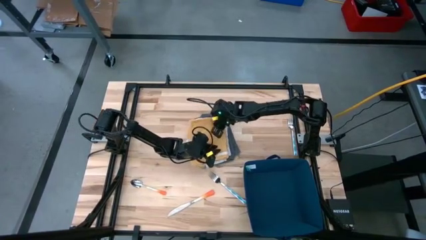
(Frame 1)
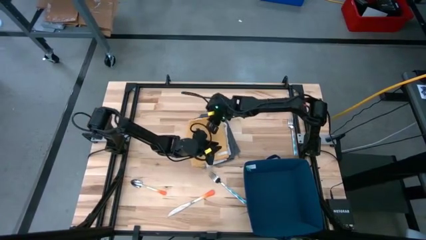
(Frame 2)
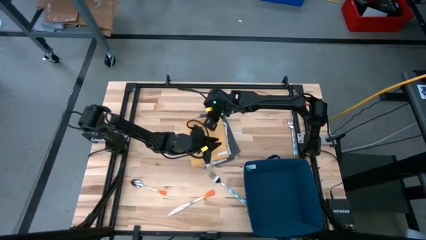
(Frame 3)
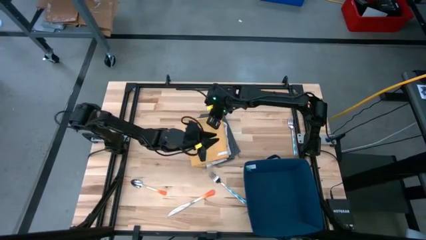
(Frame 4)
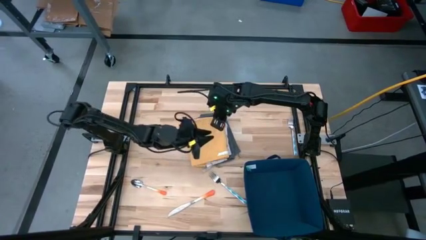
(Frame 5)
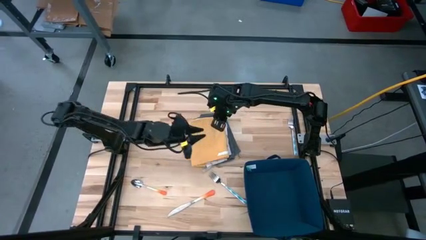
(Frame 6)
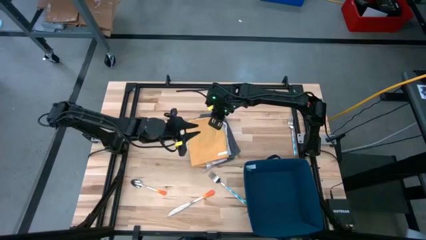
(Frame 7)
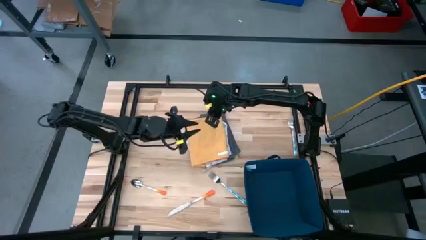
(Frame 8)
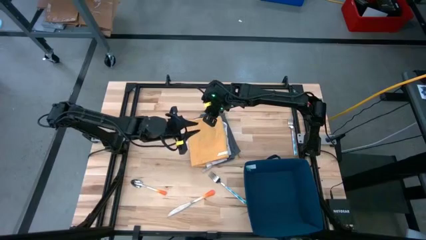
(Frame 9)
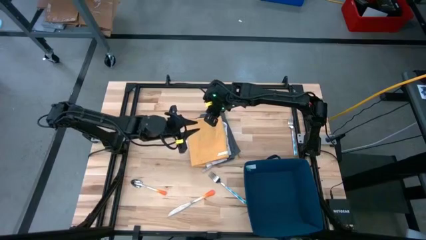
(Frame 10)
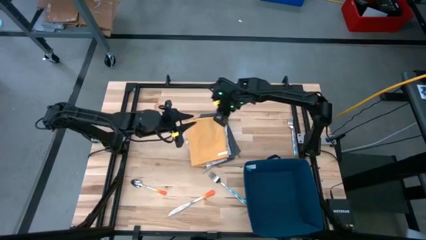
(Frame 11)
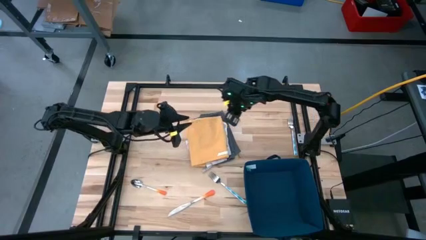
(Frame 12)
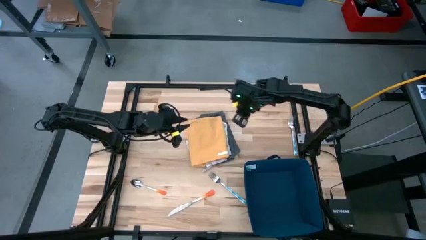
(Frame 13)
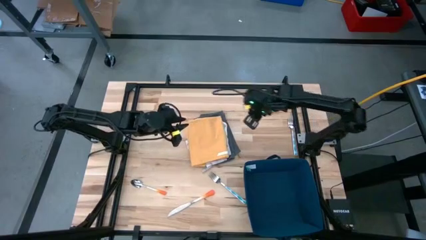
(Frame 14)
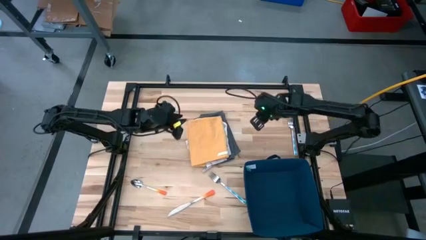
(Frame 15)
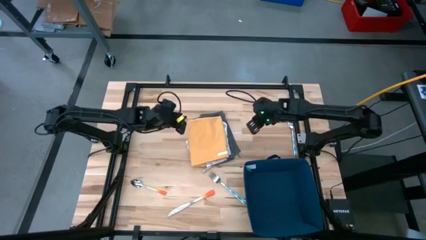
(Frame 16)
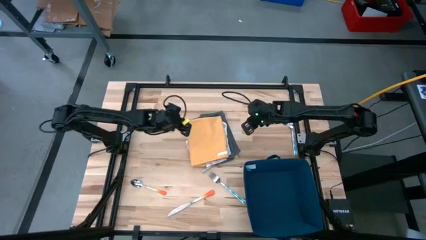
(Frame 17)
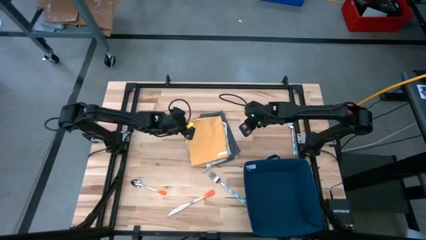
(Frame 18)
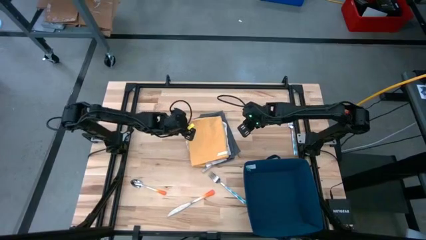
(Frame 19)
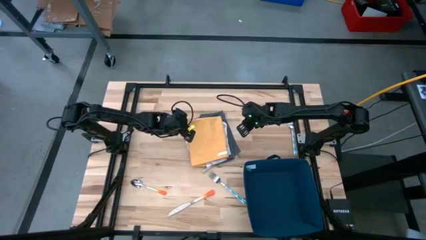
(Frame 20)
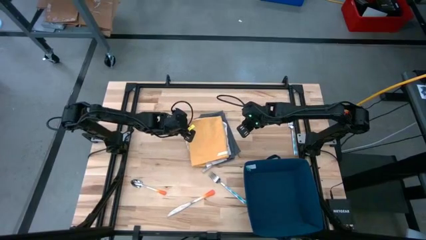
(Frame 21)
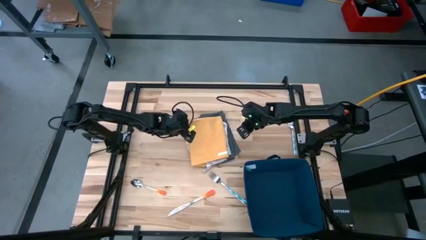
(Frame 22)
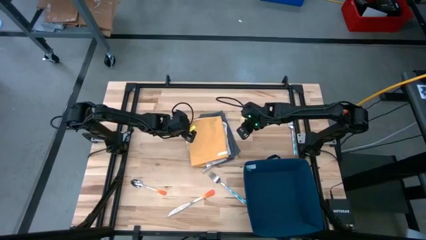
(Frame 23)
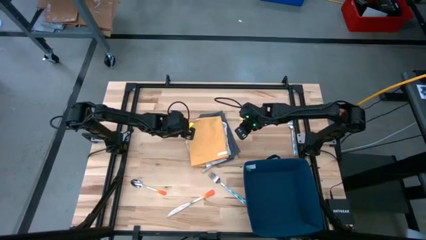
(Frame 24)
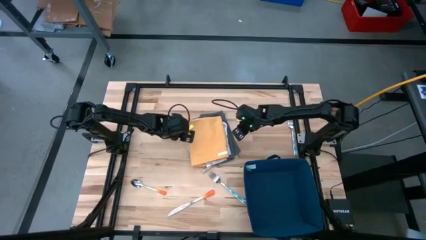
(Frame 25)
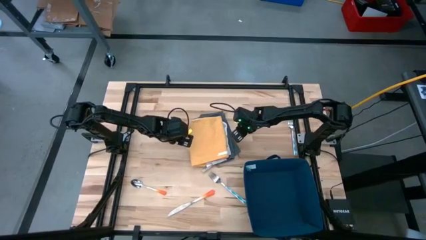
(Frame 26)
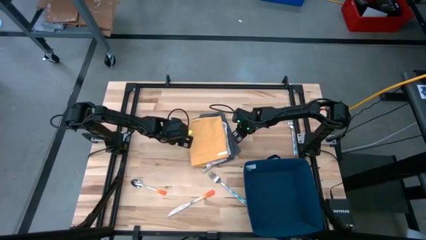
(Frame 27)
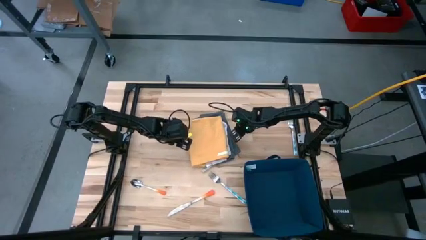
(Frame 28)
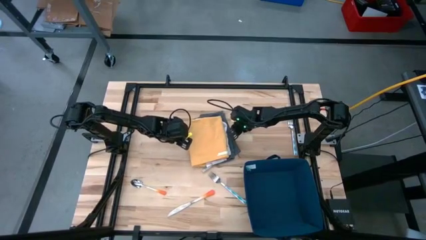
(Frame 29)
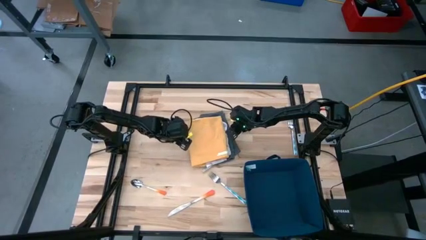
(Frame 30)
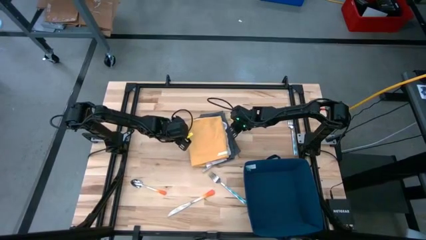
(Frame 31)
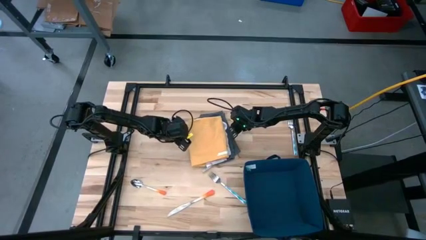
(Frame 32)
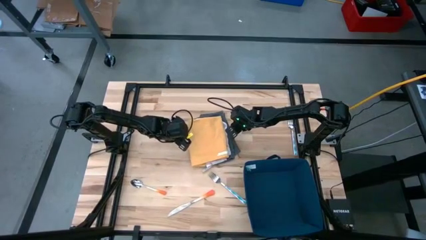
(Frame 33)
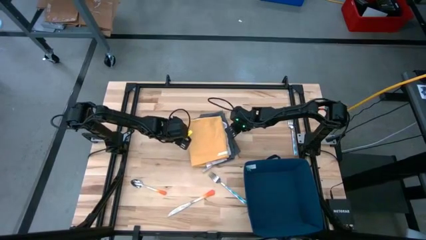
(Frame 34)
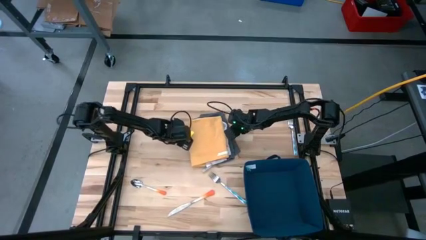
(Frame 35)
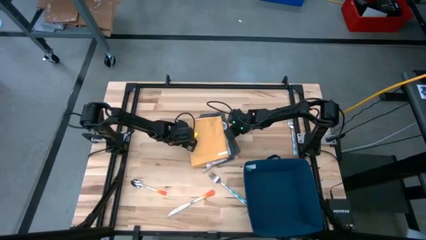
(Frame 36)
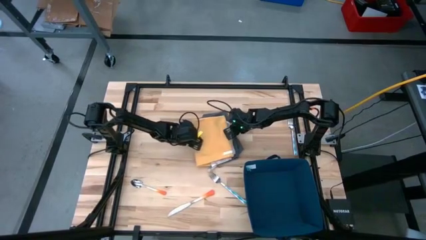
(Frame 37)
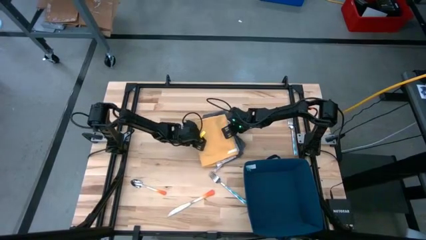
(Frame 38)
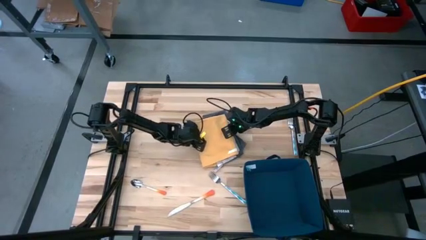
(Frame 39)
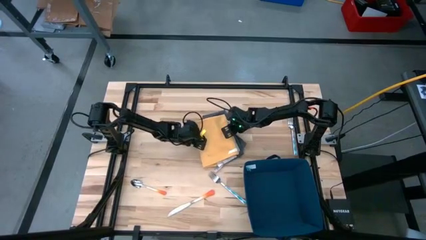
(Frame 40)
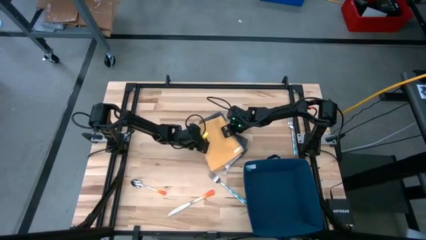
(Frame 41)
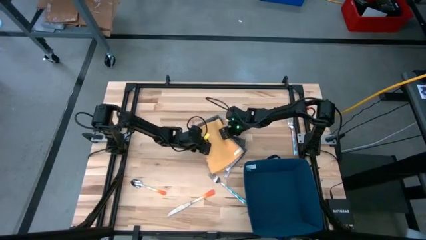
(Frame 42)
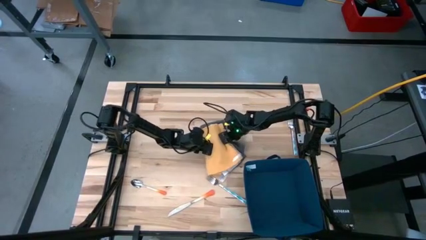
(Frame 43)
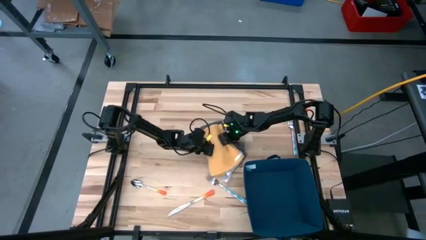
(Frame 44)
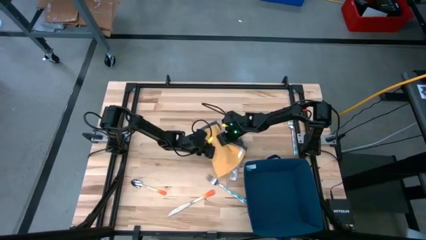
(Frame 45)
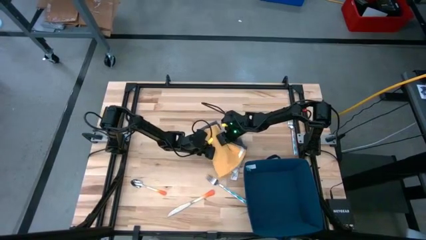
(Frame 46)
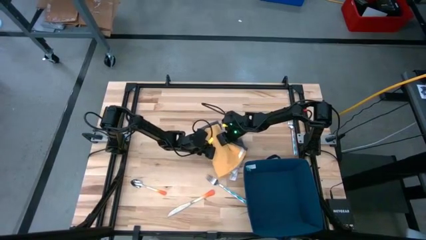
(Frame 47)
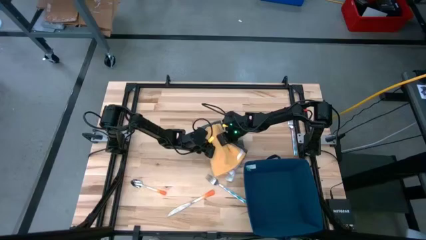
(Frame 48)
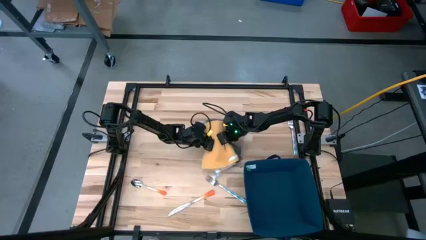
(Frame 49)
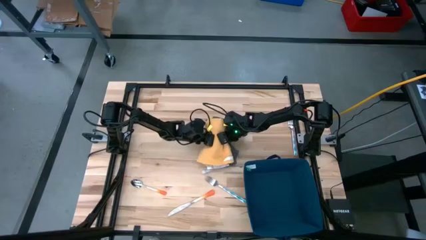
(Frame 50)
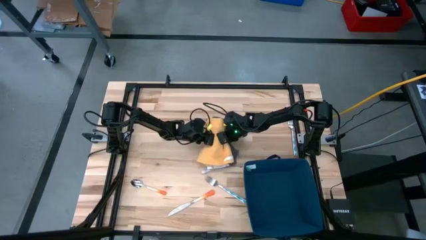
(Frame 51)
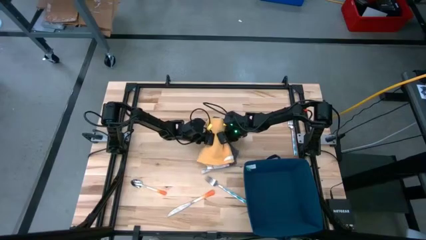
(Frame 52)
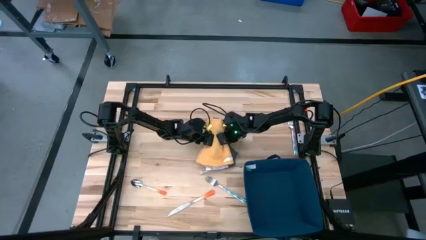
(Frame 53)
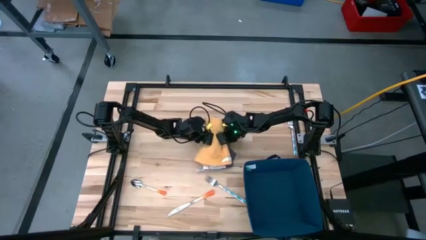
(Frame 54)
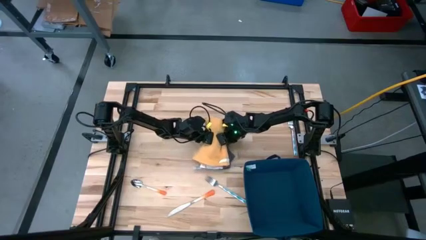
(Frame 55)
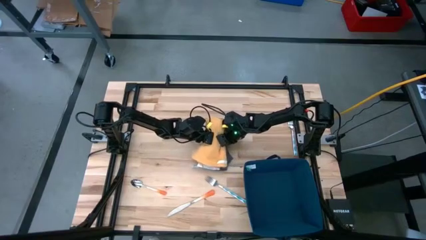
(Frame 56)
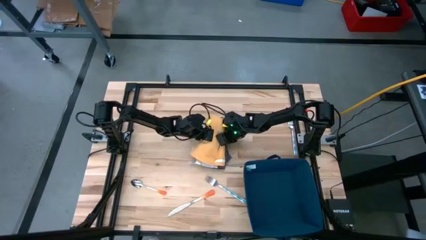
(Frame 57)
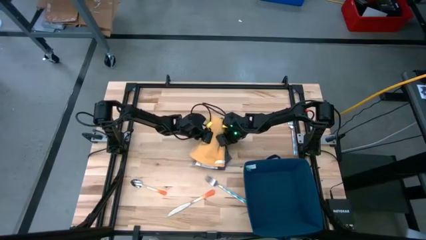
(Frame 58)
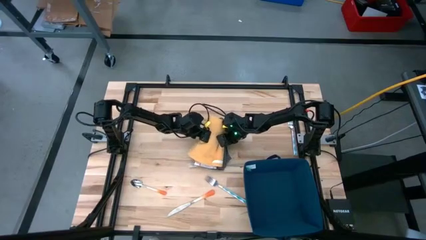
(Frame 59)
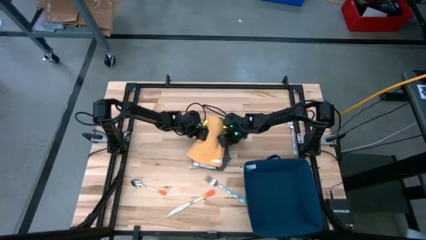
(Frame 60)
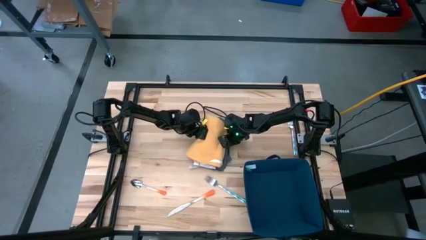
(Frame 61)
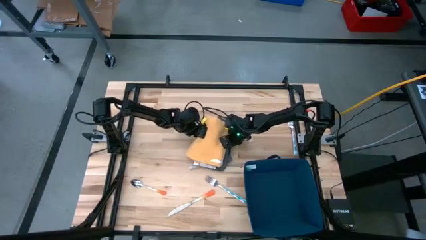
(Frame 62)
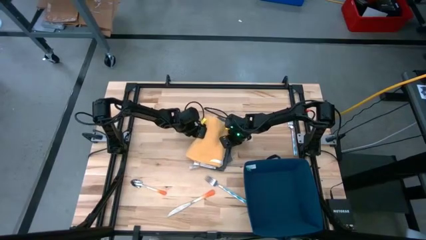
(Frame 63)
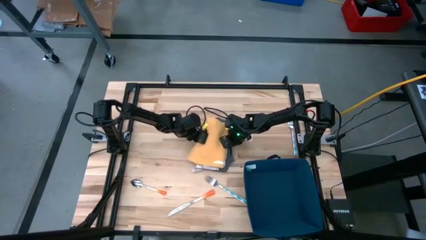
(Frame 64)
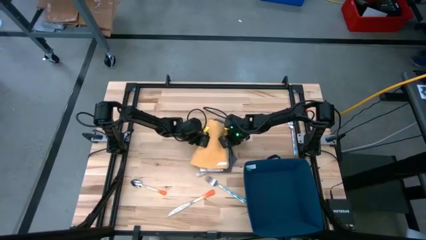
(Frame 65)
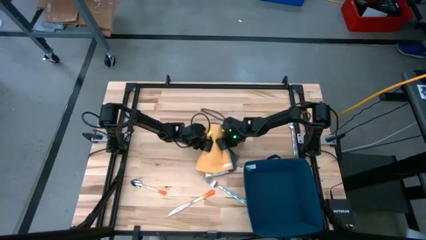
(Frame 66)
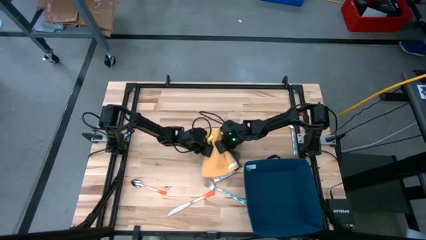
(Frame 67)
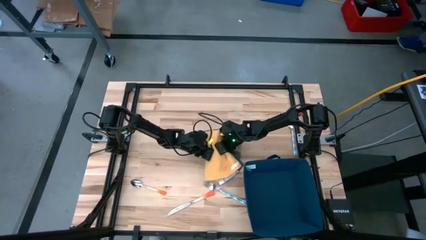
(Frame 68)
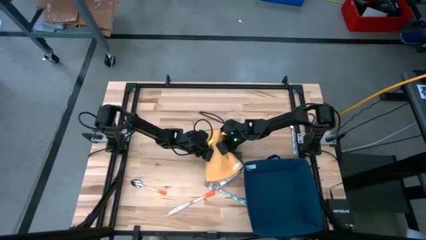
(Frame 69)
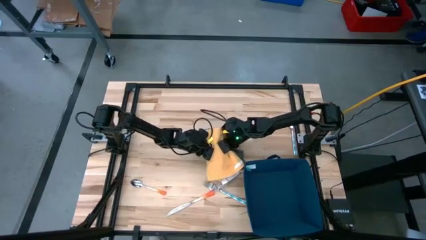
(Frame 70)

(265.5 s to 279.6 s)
Task: Fold towel
Put the stacked towels into the laundry bin
